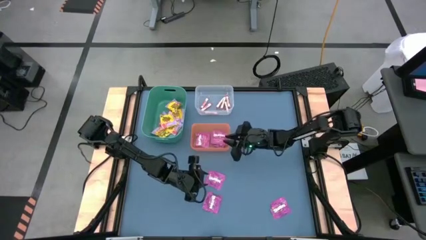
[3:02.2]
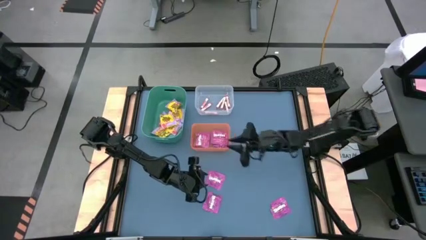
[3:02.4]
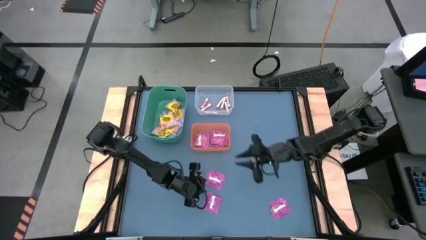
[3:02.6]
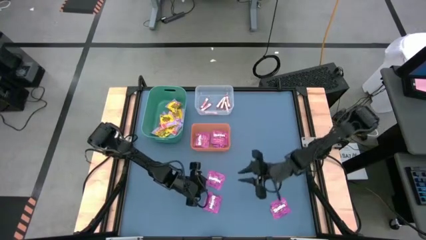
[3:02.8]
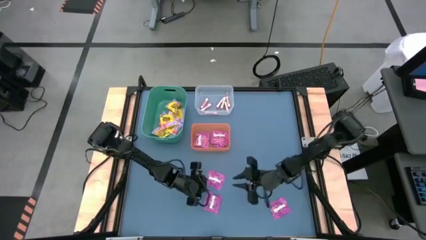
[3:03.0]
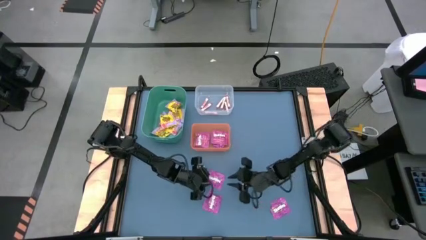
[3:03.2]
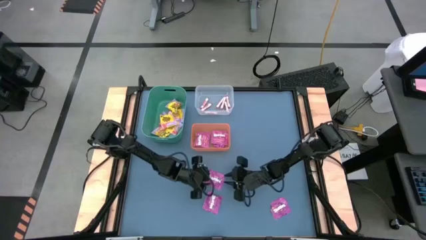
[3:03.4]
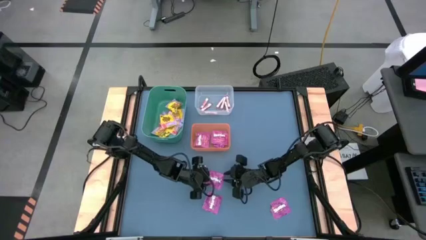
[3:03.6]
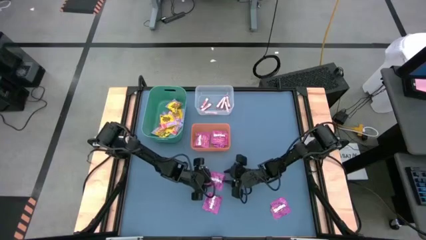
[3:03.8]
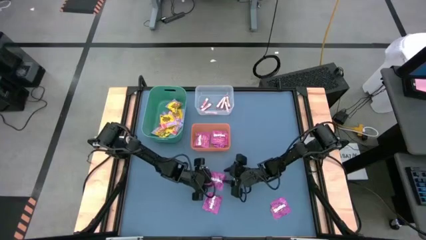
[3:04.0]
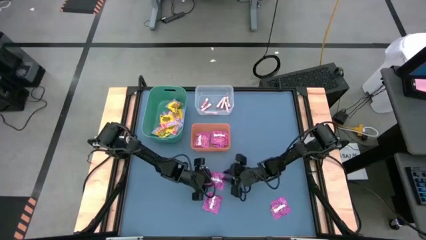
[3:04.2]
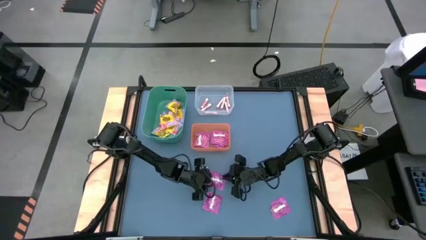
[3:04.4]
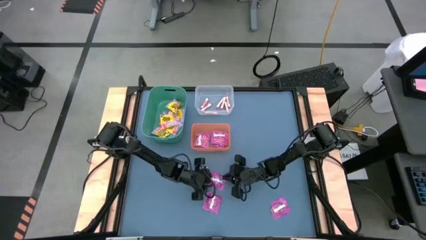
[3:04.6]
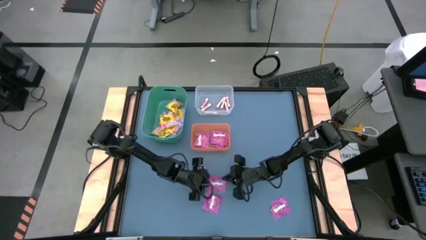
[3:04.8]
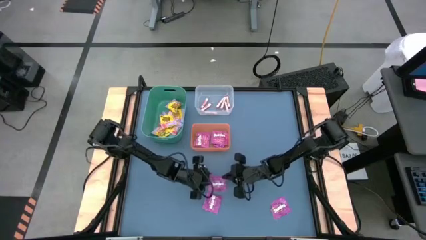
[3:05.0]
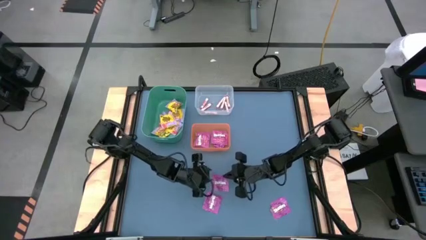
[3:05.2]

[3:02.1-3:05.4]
Task: Sort candy
Put the violet candy into the orange bin

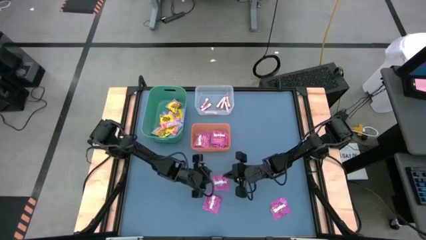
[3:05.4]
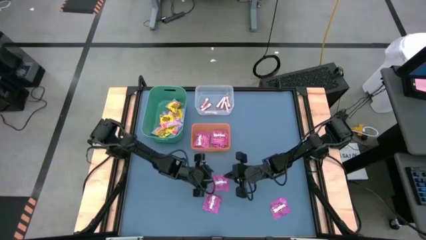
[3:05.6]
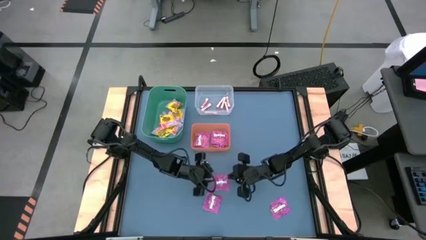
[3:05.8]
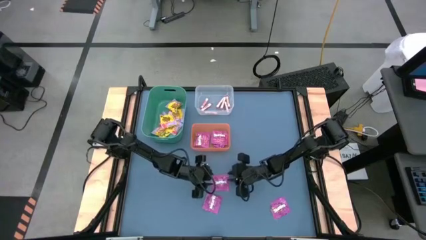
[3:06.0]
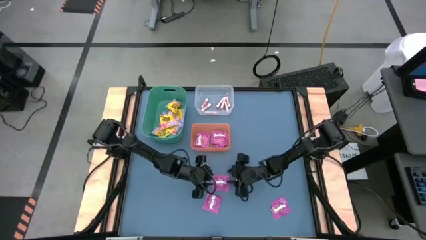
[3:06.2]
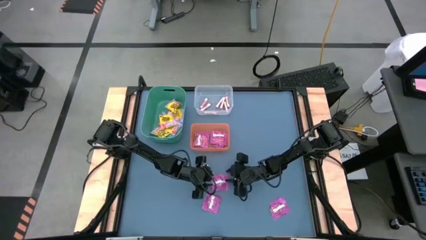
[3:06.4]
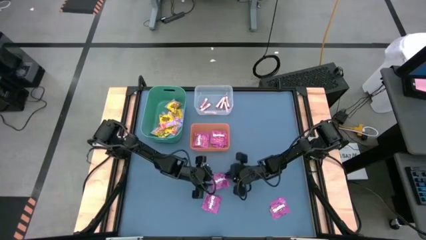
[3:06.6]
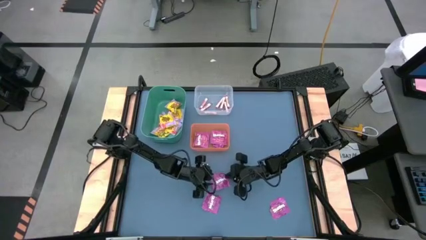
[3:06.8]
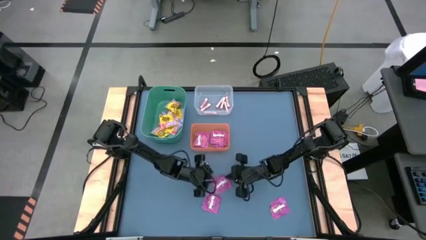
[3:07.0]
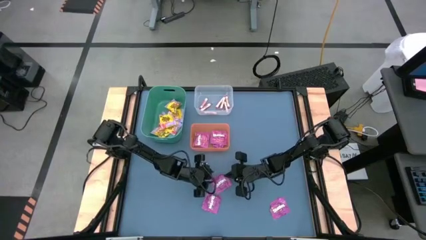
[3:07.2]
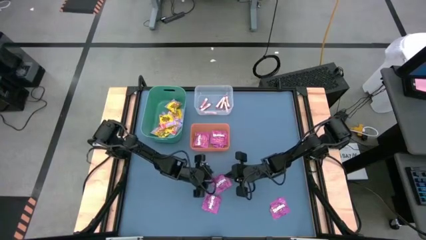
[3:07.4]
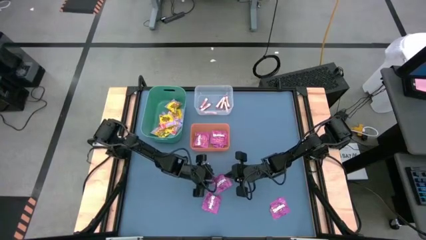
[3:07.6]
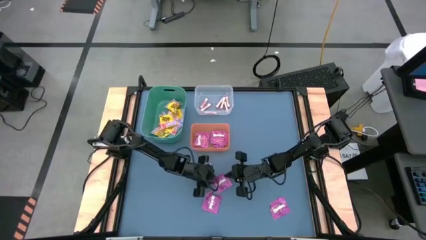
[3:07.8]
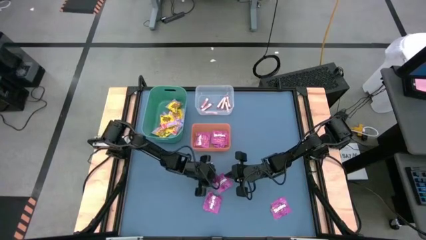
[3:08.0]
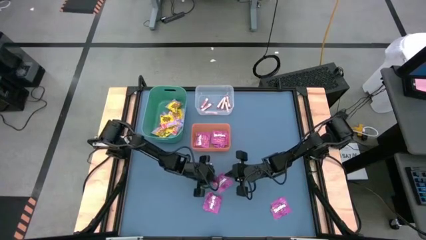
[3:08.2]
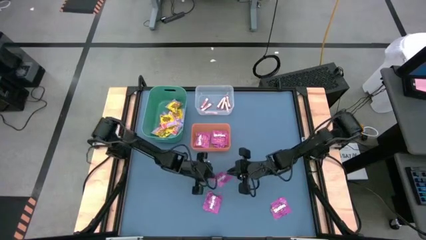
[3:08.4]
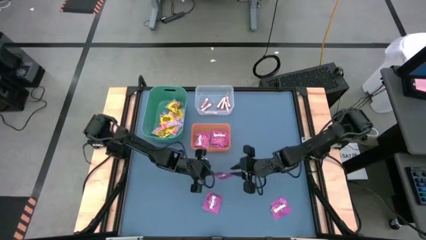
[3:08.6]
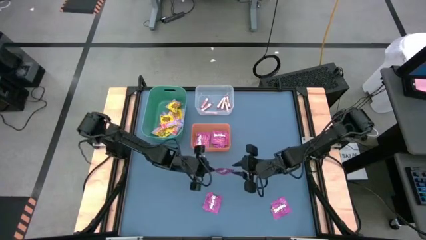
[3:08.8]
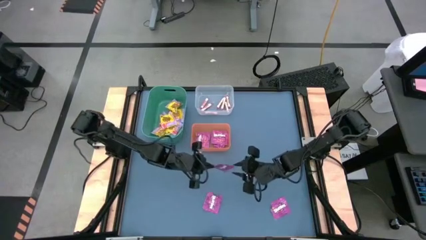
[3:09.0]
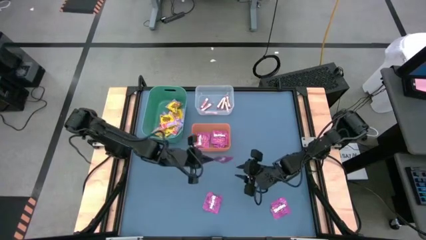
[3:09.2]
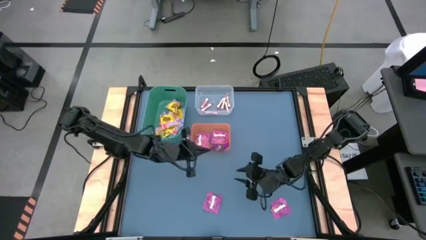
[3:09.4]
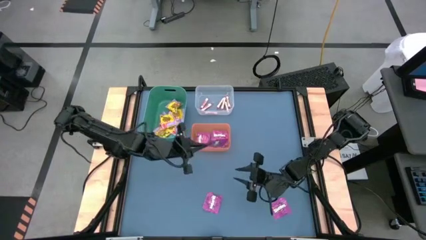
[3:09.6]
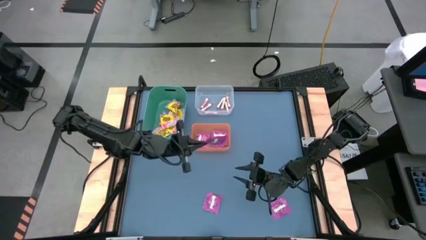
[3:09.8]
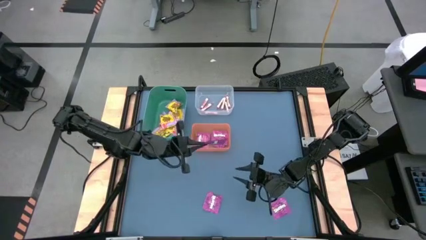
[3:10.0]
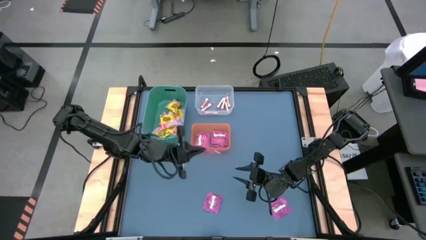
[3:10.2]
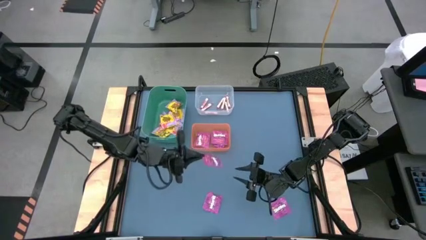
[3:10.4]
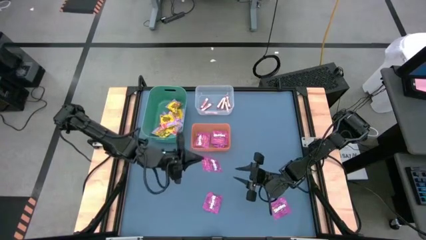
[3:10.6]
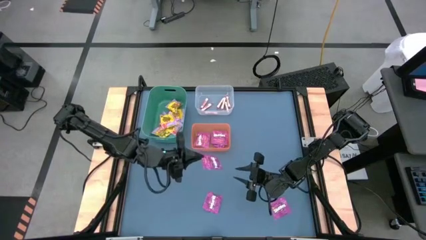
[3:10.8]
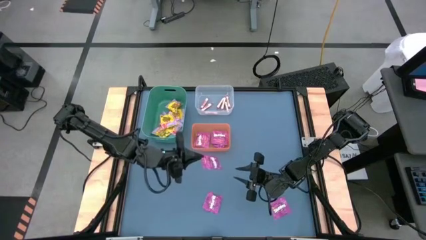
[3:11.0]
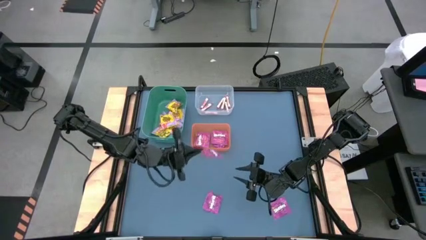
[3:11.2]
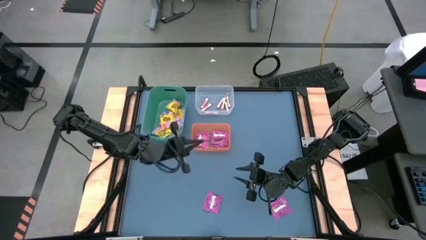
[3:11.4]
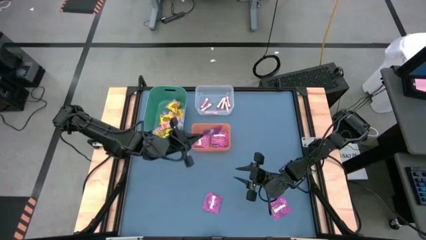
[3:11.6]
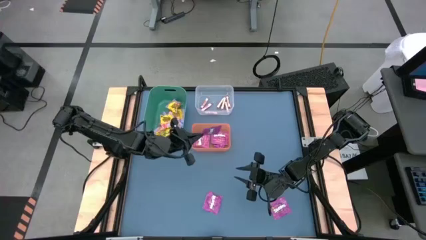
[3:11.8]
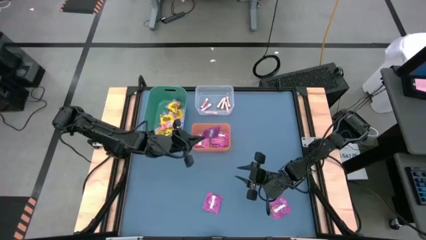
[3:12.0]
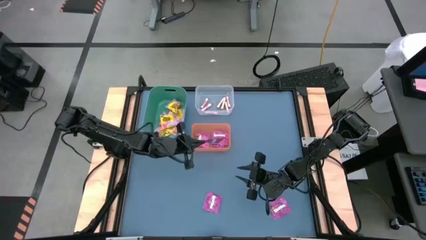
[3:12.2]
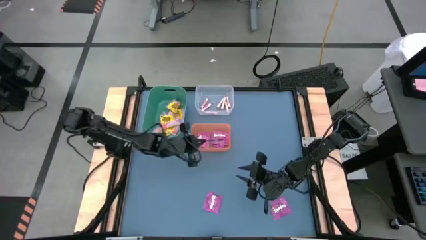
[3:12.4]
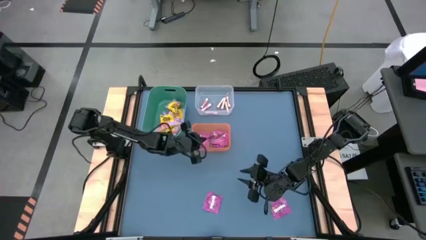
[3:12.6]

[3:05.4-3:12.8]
Put the violet candy into the orange bin

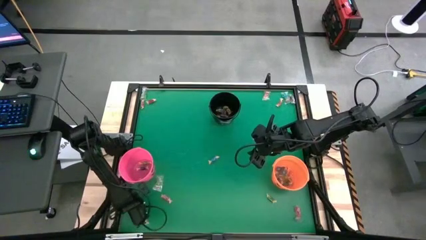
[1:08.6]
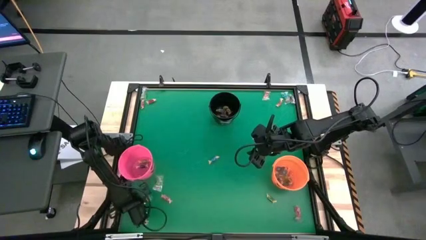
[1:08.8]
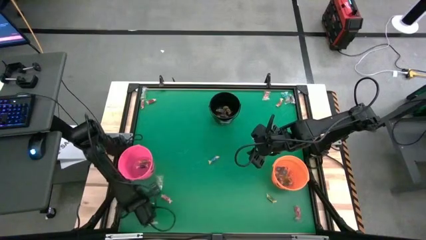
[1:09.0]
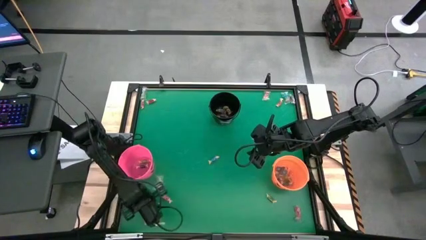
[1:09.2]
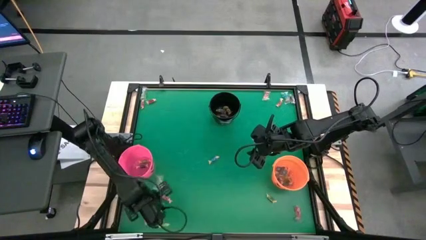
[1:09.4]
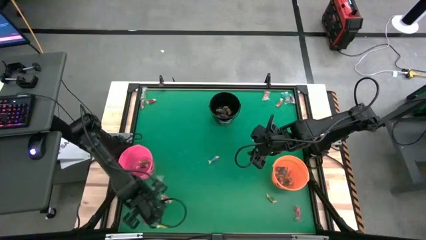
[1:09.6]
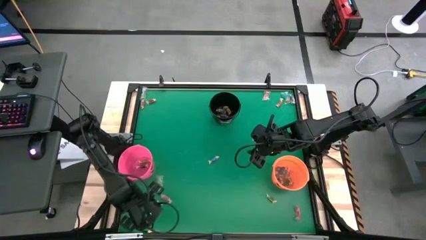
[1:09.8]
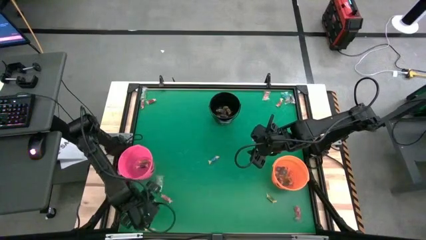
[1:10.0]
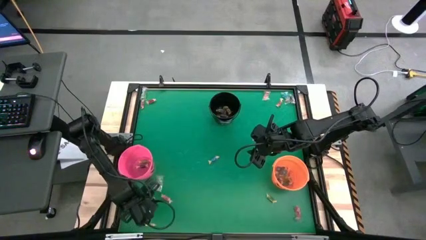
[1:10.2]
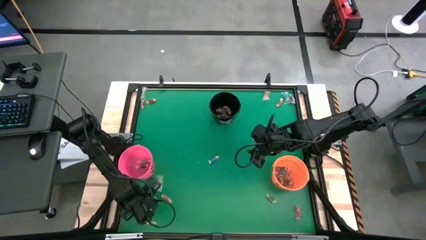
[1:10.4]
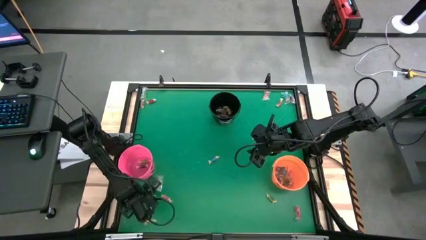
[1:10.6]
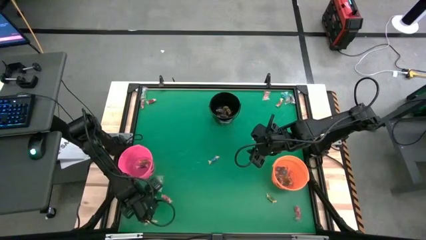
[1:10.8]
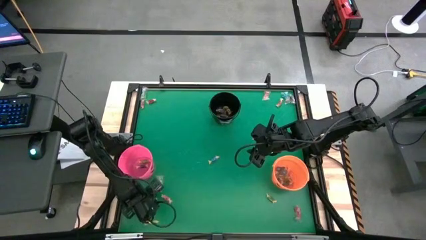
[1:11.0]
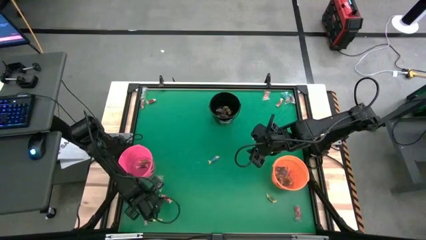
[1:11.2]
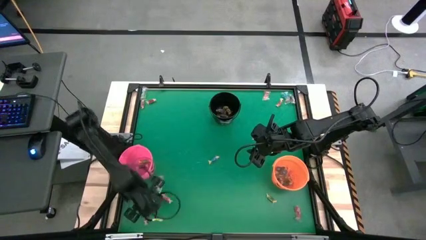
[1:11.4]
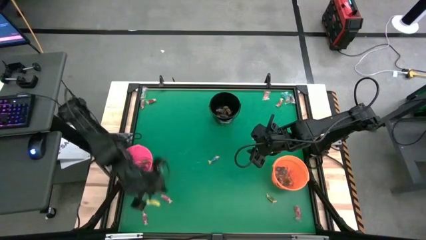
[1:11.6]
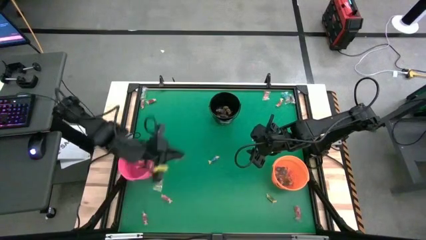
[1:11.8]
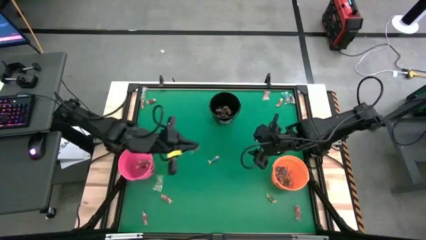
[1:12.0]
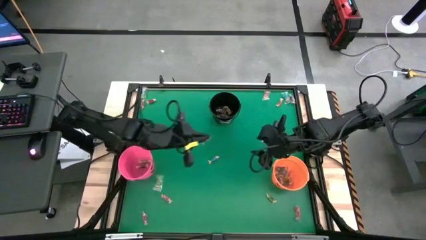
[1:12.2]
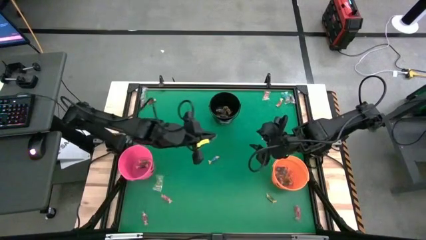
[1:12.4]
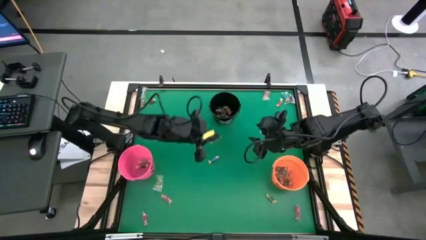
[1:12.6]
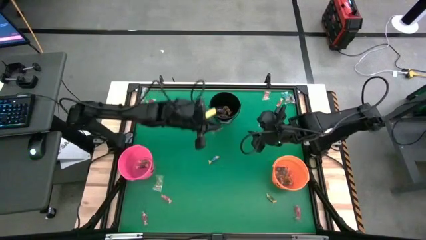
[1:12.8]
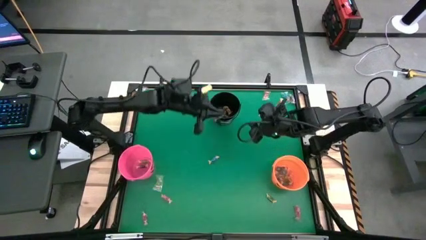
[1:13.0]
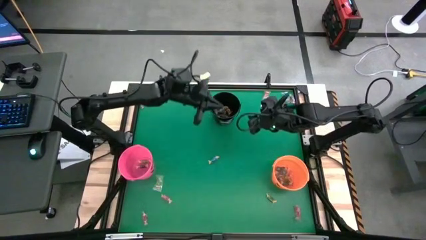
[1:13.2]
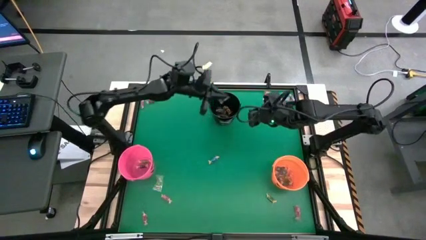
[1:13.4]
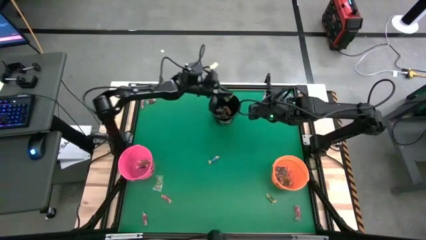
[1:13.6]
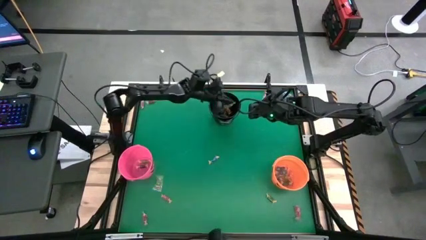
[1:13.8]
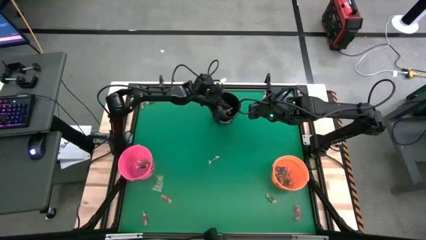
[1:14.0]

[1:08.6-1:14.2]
Task: Sort candy by brand, put in halloween buckets
Put the transparent candy into the black bucket

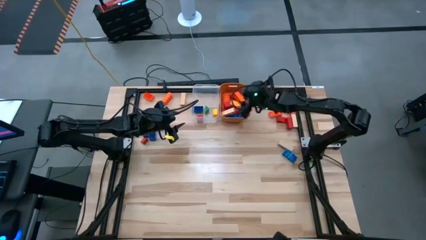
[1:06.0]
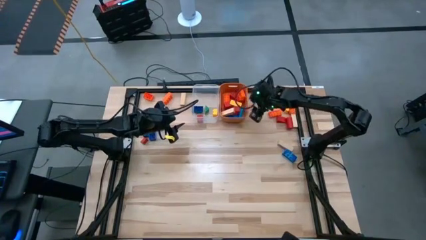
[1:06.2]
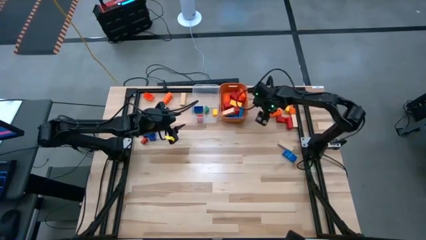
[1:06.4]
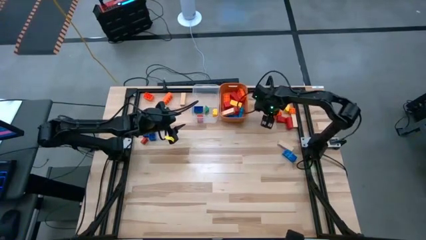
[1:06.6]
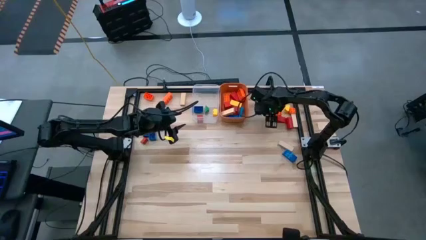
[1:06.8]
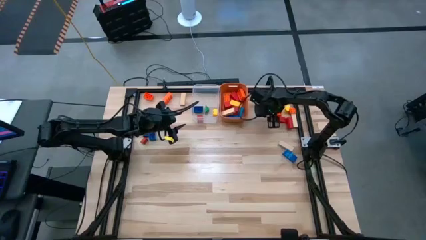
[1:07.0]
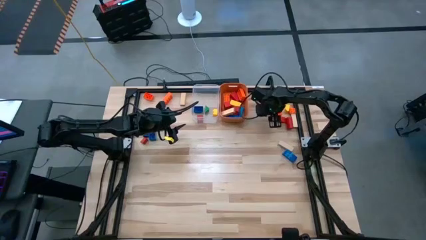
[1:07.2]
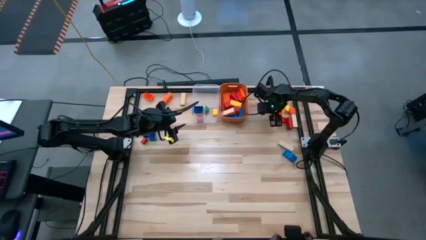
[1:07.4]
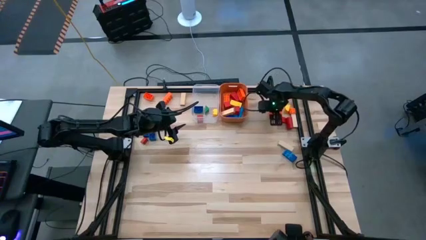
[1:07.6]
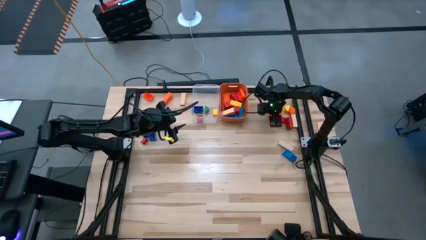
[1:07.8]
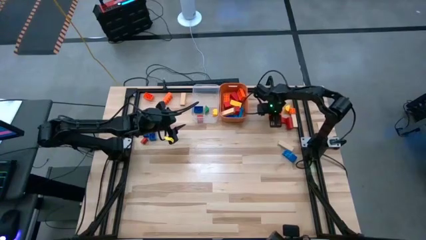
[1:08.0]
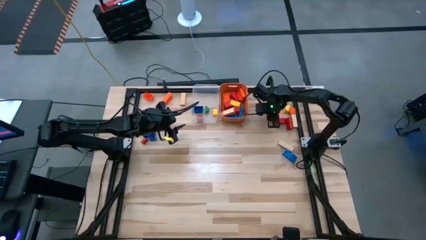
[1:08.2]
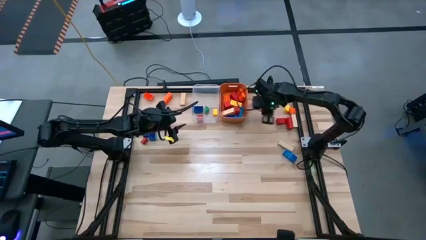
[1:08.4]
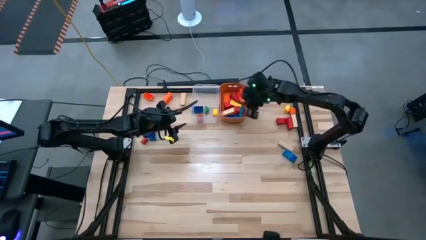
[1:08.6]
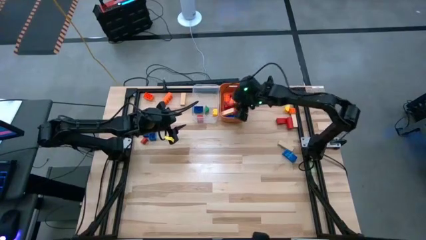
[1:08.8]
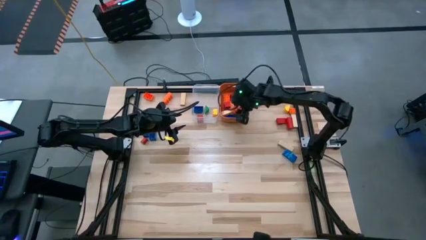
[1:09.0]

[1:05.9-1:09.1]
Task: Sort blocks by size
Put the orange rectangle game piece into the orange bin
